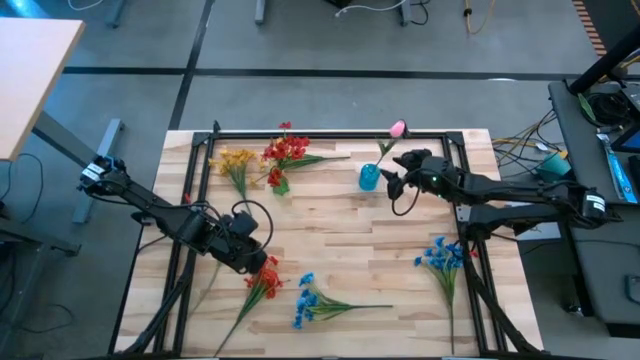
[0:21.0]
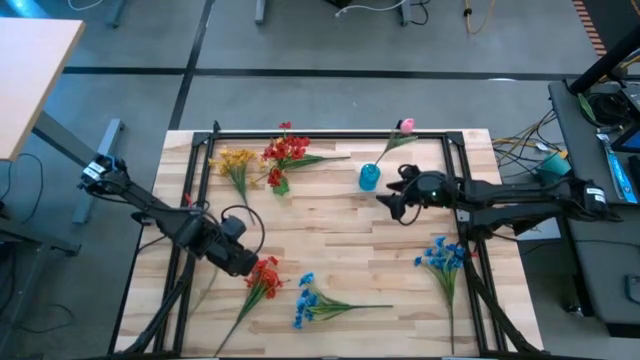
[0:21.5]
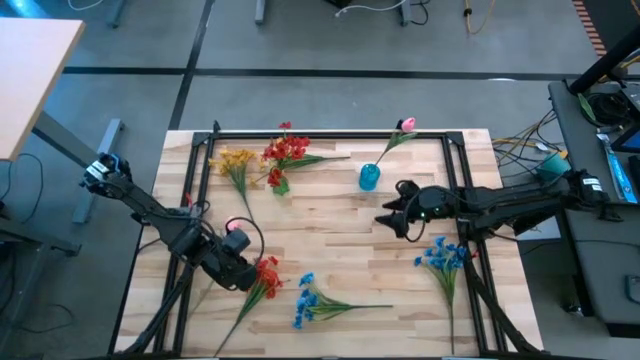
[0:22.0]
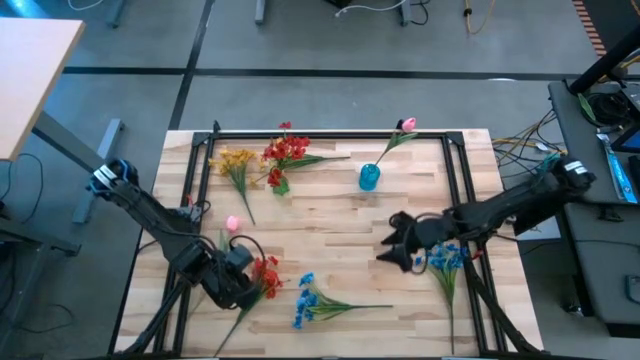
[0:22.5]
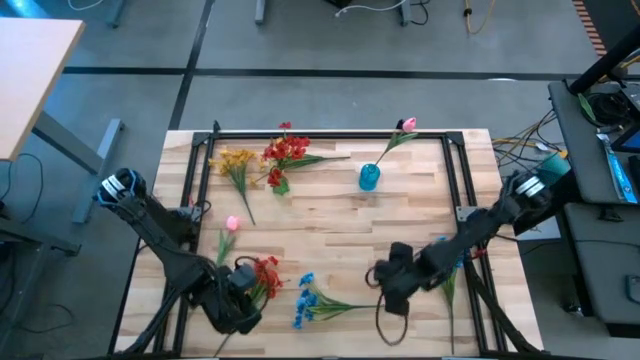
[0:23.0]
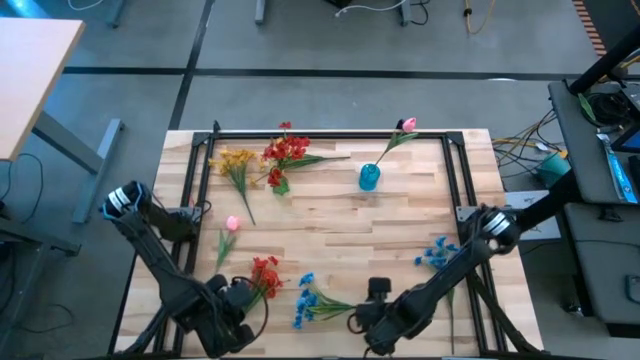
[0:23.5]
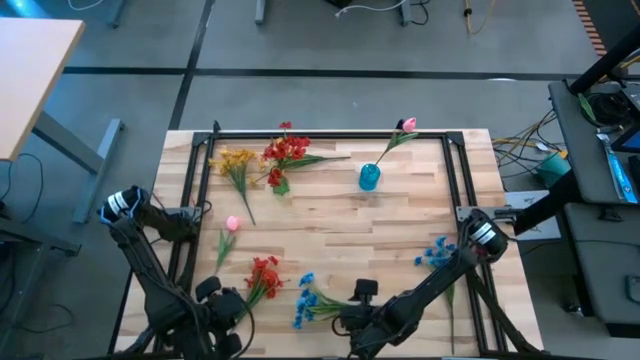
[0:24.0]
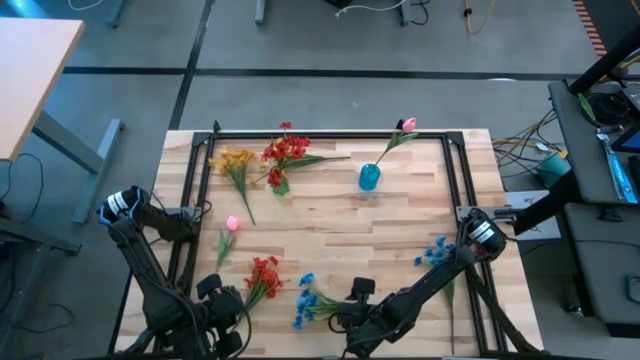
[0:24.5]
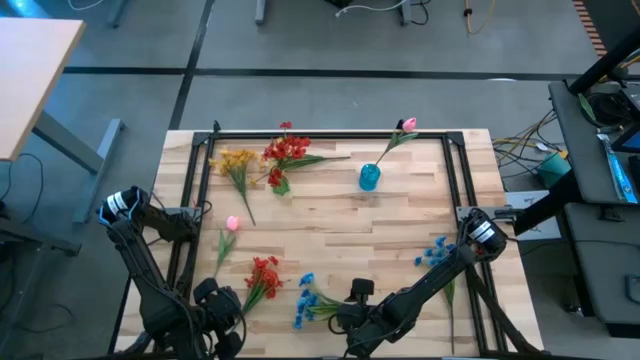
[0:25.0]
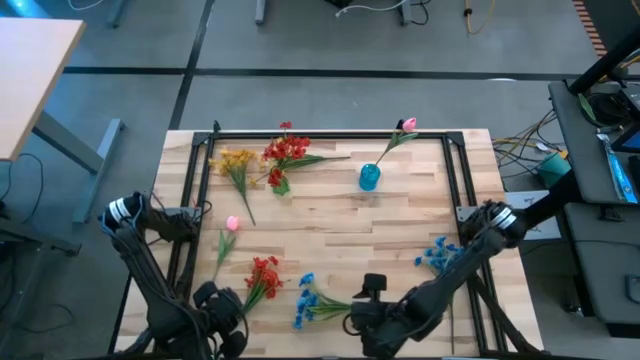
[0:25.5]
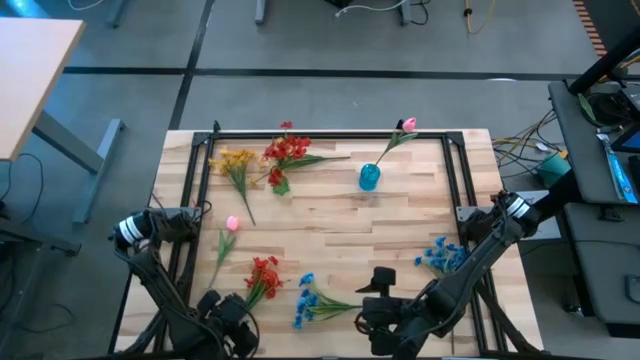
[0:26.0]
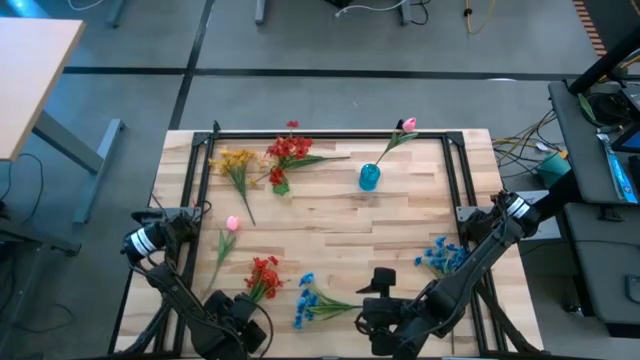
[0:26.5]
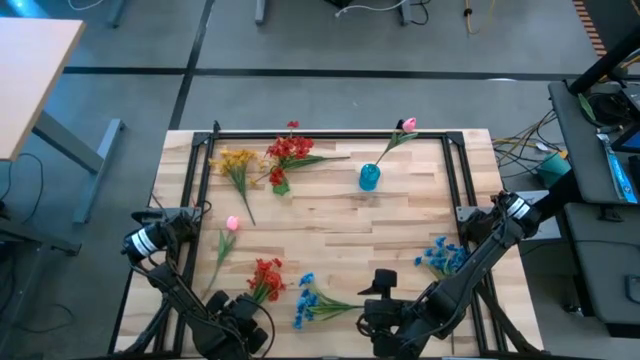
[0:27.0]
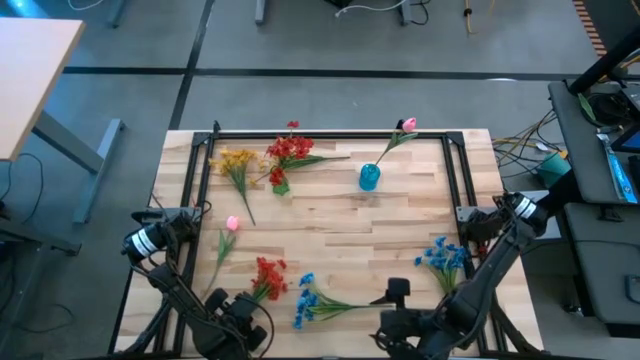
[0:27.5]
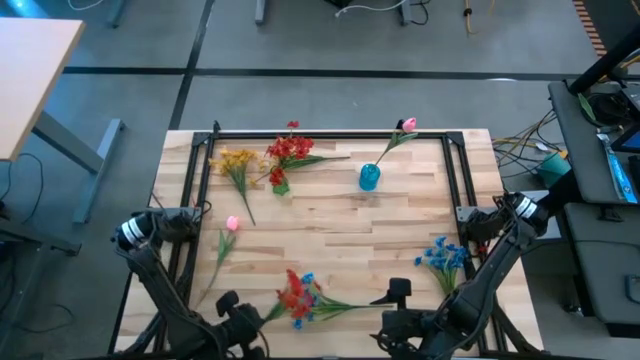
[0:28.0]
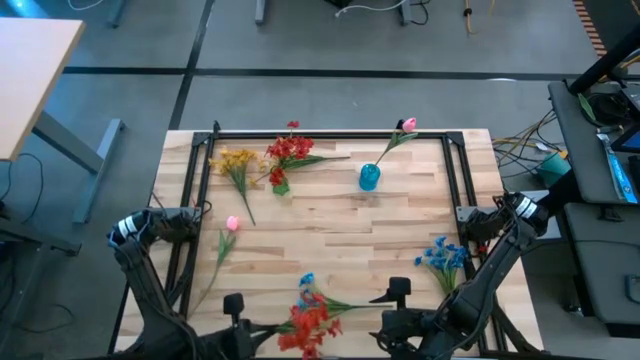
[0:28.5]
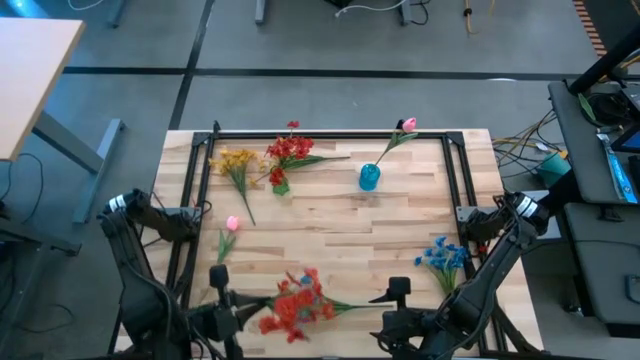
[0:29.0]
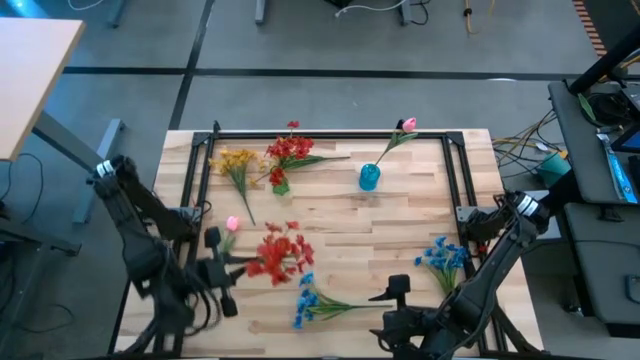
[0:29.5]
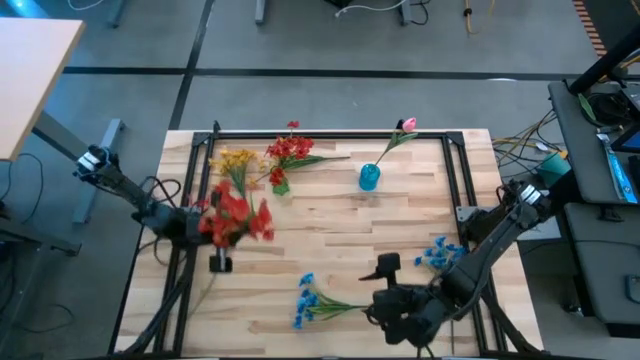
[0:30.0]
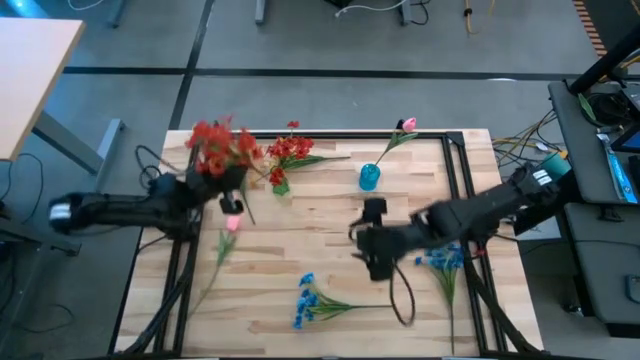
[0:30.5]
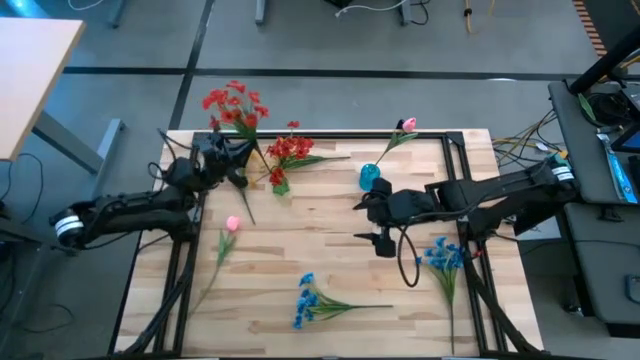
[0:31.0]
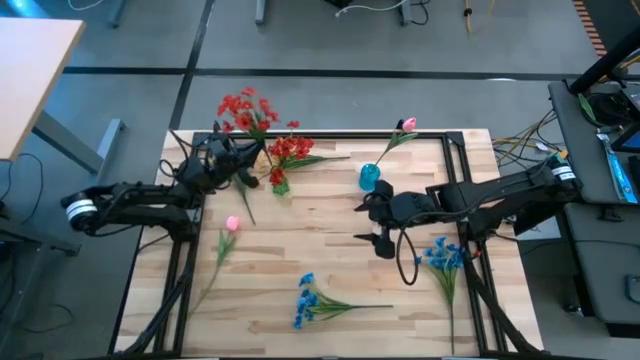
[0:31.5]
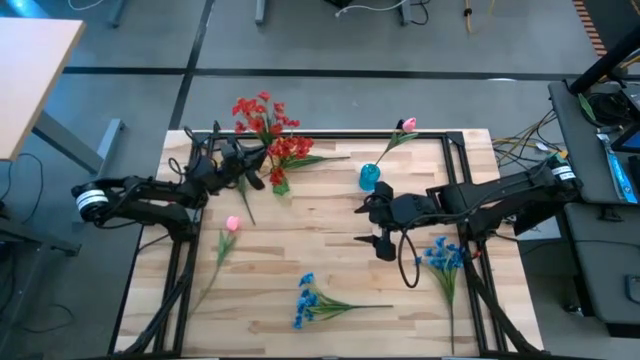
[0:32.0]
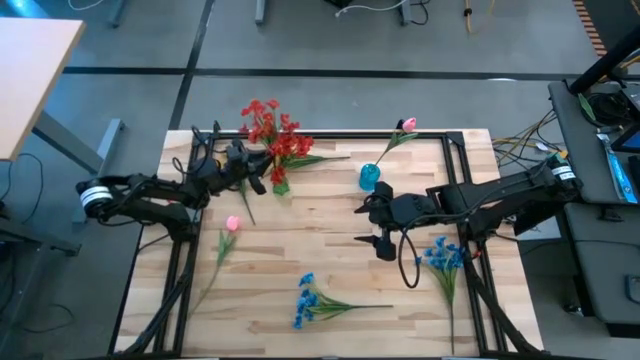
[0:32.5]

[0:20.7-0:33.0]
Task: Sort flowers into vase by color
Put the red flowers into the green vase

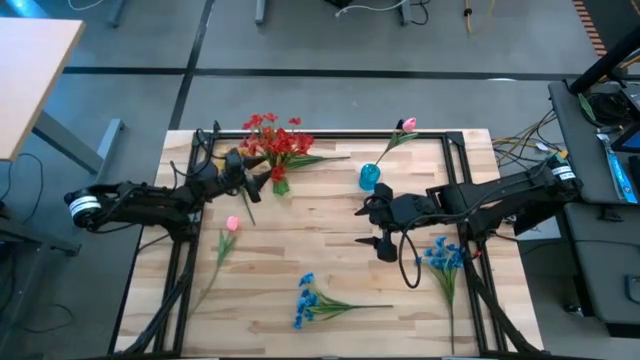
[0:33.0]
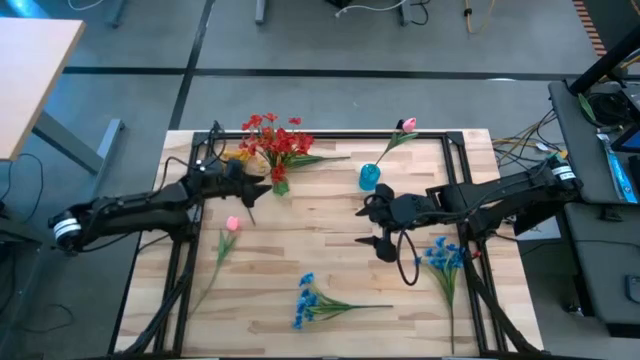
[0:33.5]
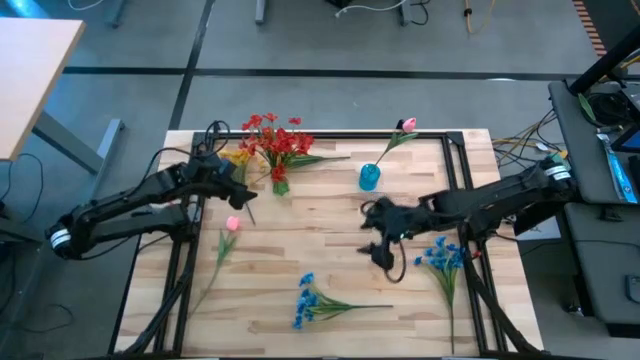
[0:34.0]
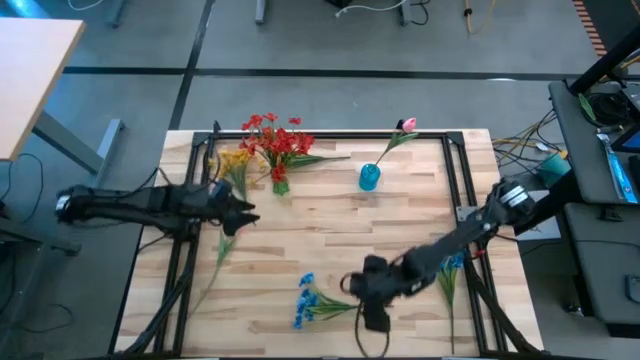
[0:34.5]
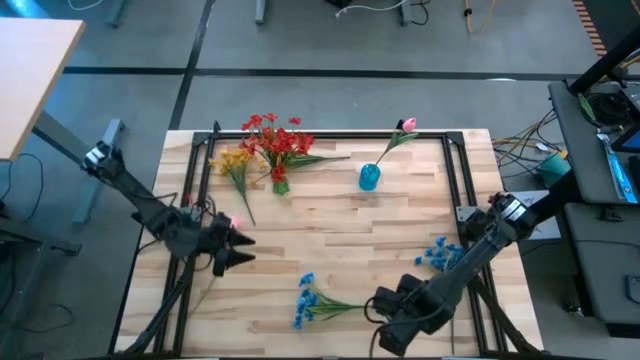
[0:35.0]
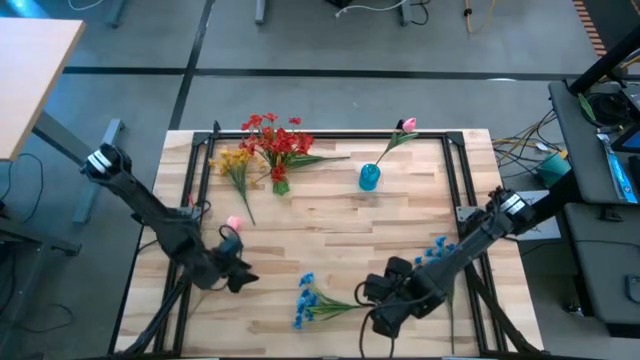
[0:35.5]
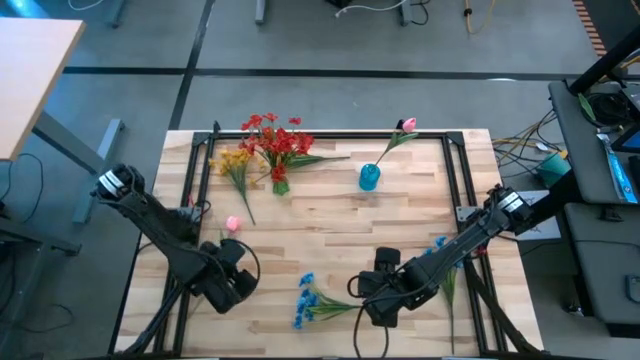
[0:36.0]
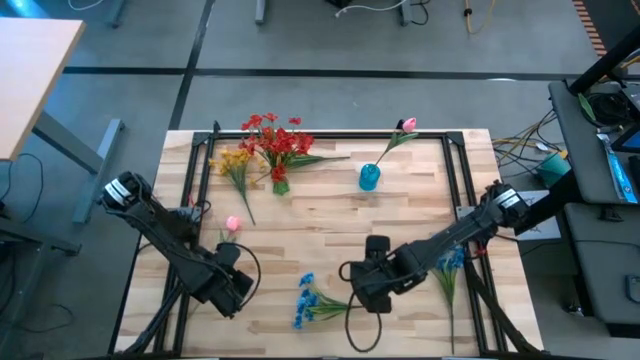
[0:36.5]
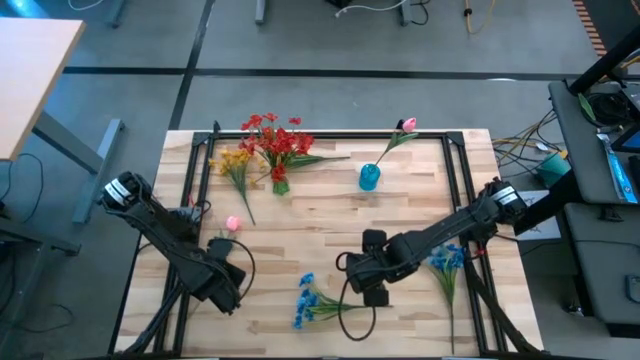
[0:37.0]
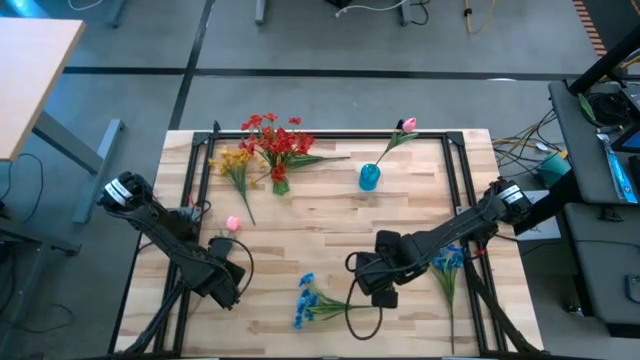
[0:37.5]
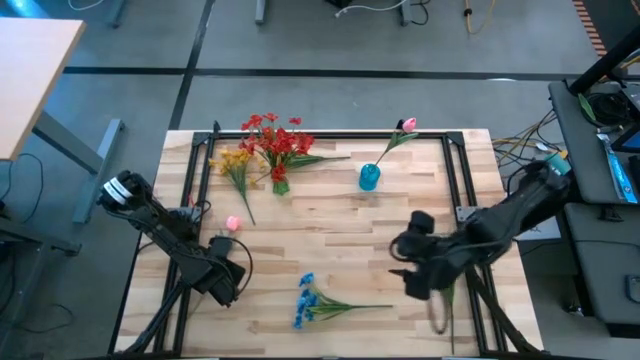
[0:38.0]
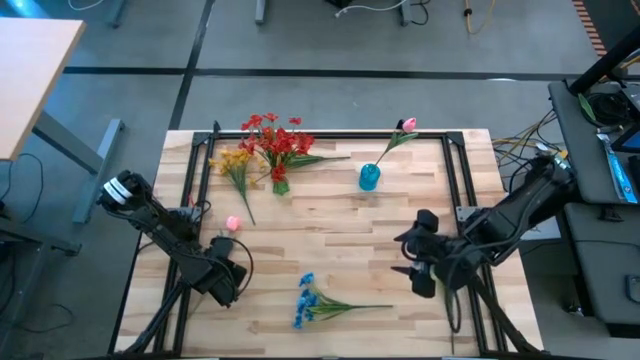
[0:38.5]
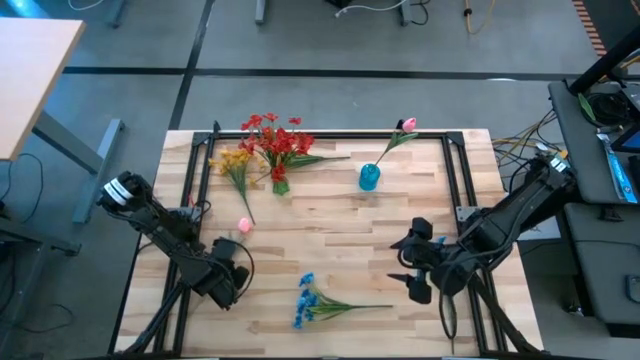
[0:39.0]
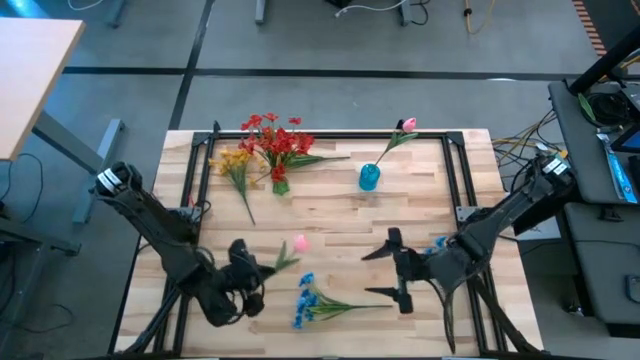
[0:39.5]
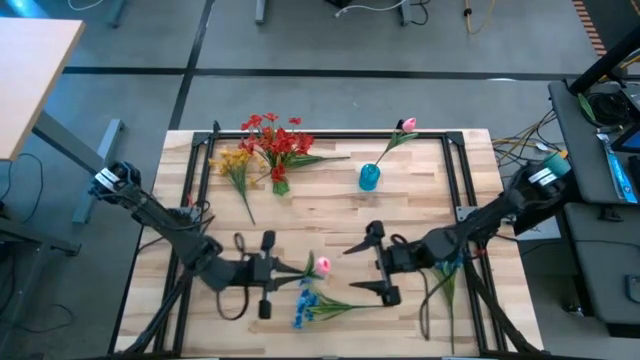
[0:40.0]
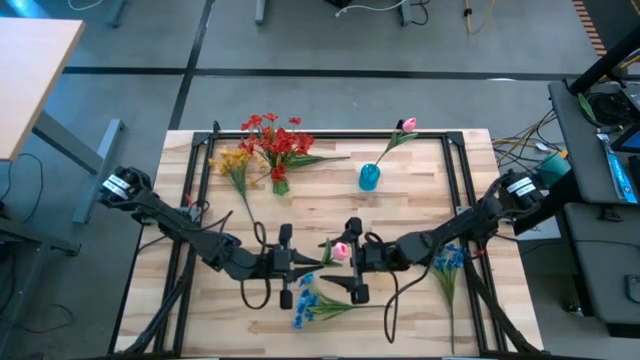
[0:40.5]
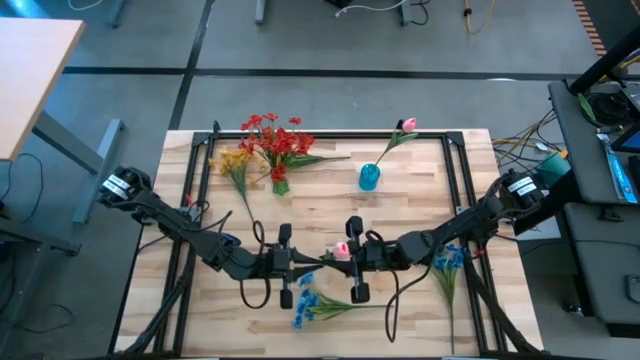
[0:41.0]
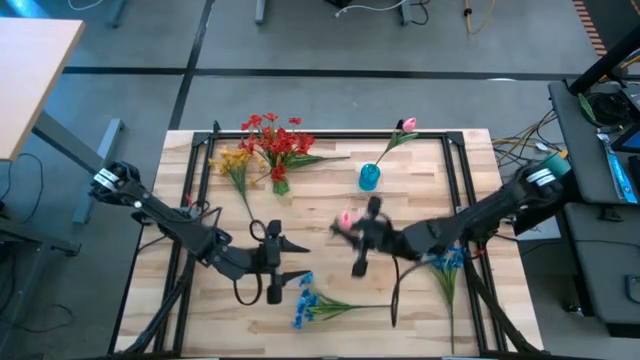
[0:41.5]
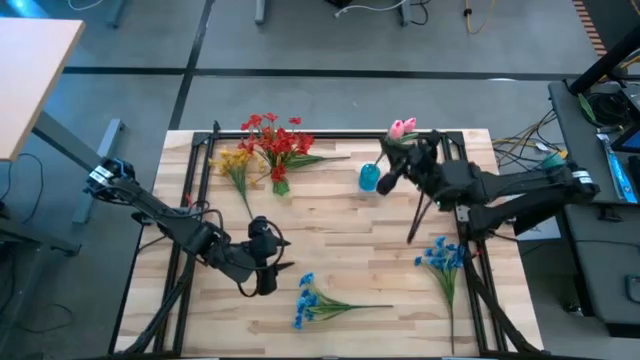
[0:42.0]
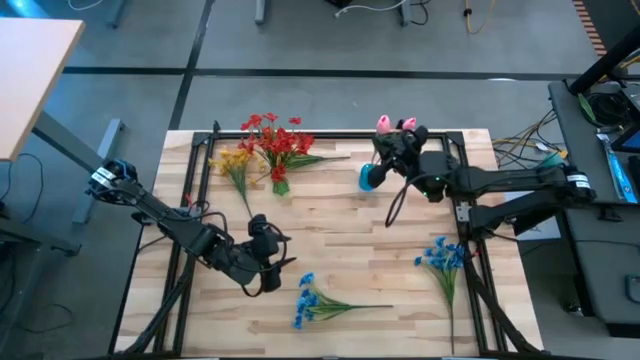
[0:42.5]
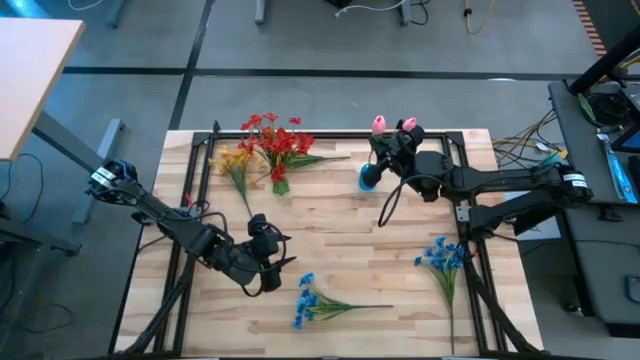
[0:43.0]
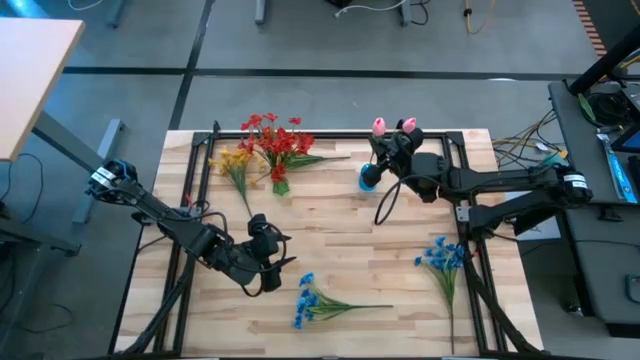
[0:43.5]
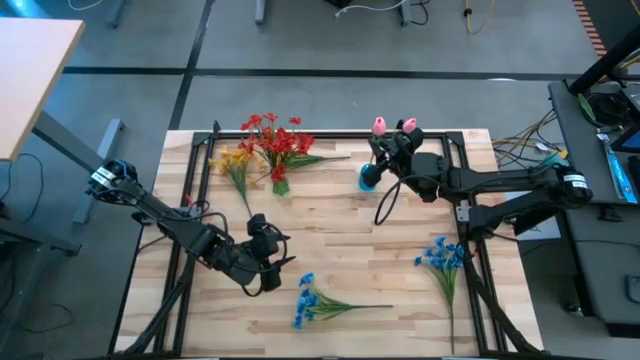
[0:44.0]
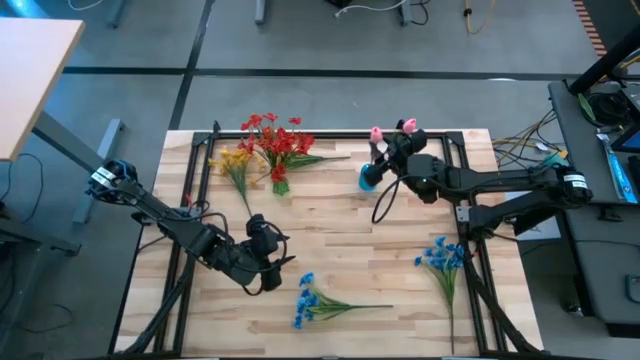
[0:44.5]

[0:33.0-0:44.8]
Put the pink tulip into the blue vase
